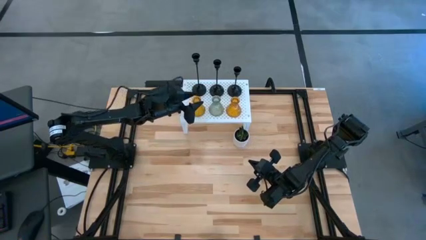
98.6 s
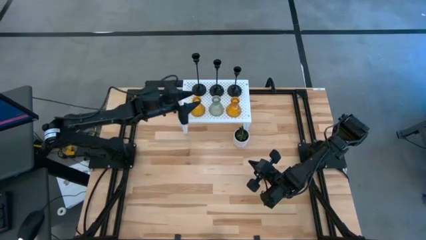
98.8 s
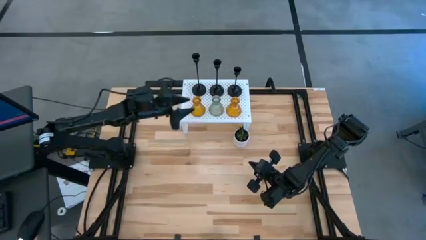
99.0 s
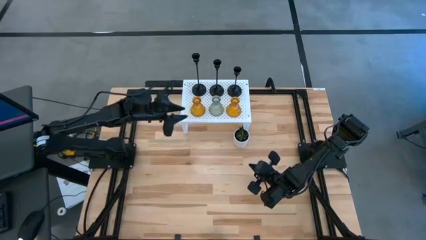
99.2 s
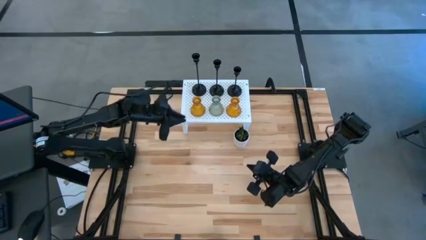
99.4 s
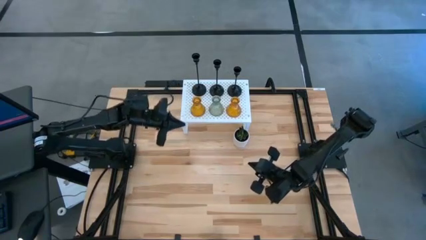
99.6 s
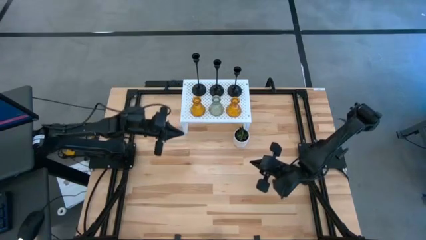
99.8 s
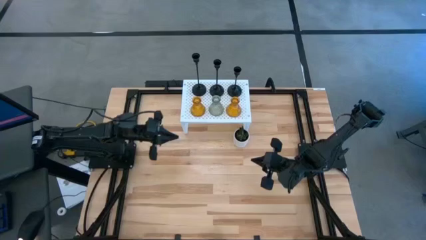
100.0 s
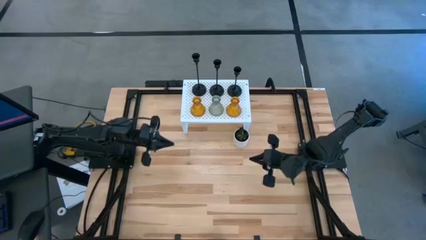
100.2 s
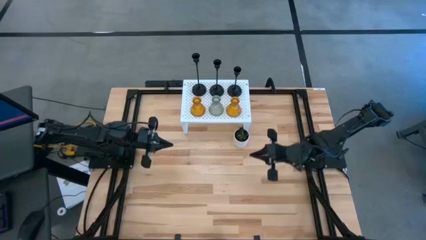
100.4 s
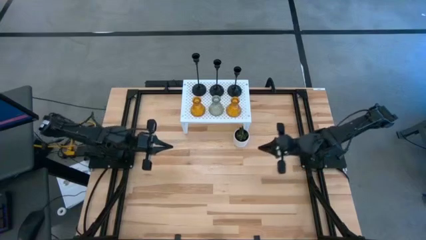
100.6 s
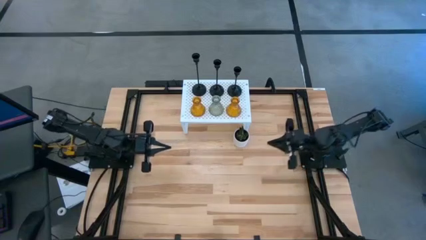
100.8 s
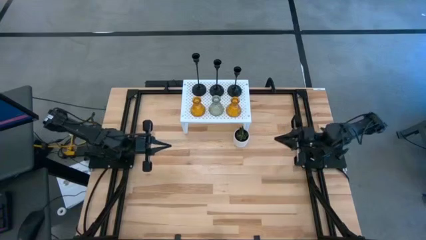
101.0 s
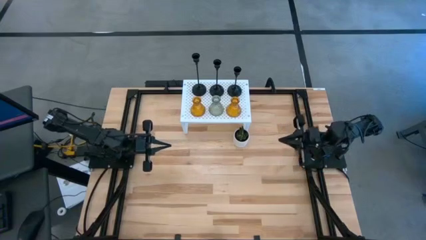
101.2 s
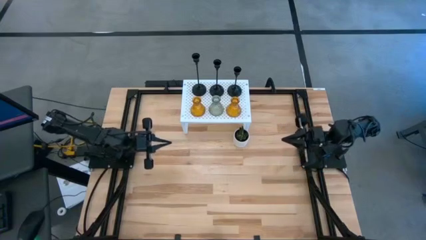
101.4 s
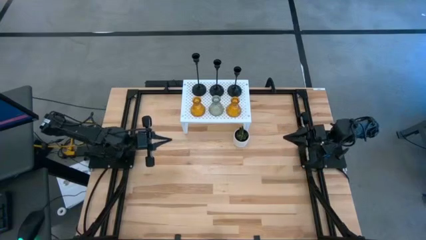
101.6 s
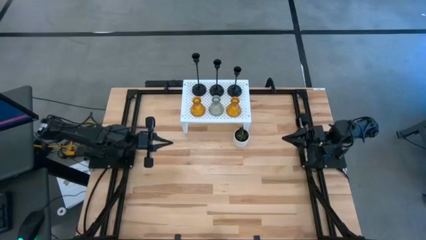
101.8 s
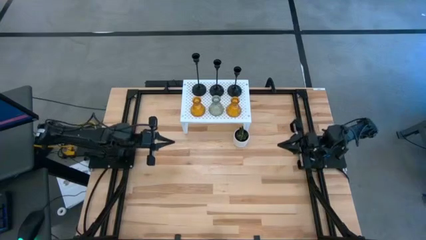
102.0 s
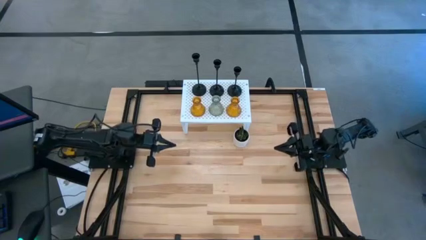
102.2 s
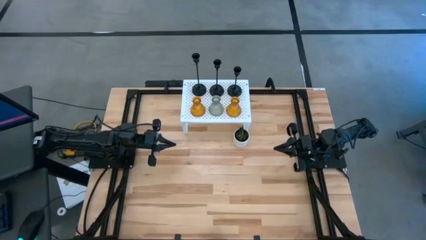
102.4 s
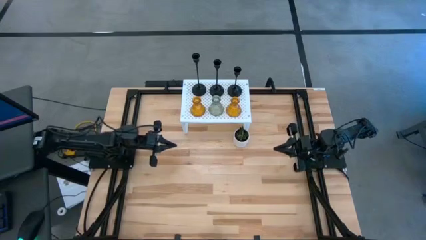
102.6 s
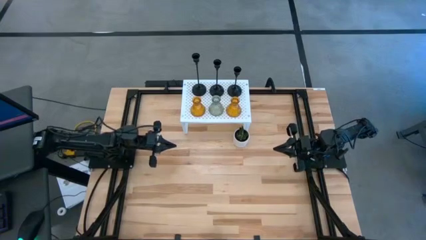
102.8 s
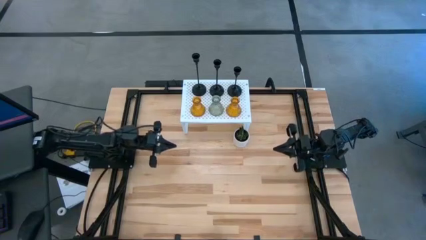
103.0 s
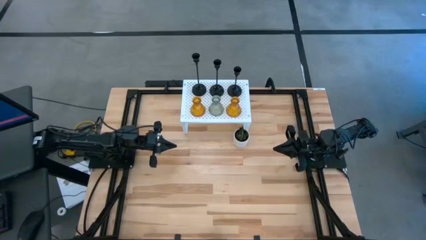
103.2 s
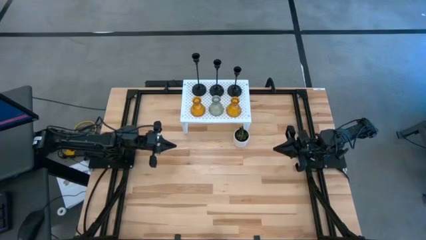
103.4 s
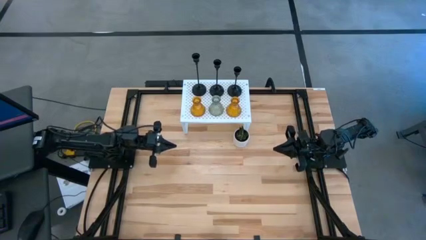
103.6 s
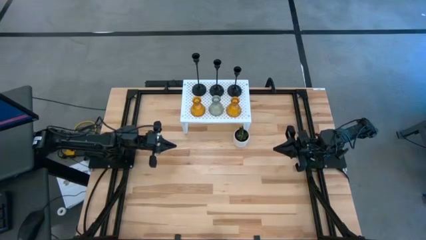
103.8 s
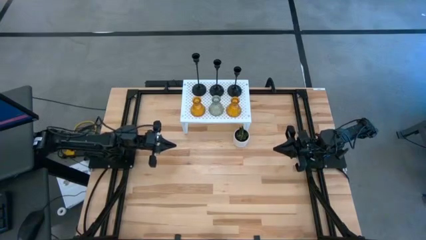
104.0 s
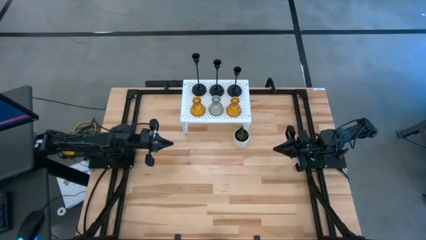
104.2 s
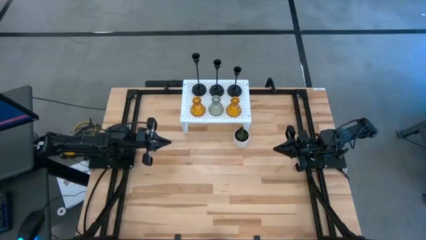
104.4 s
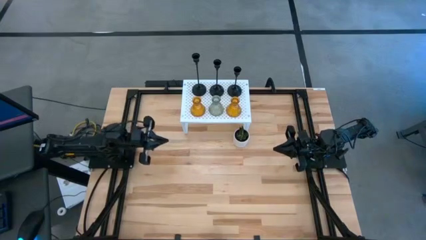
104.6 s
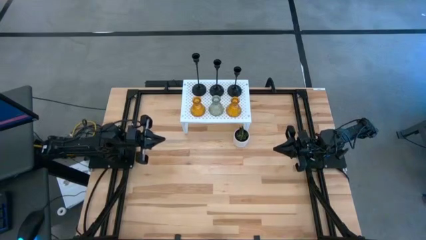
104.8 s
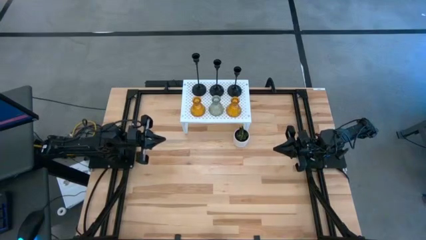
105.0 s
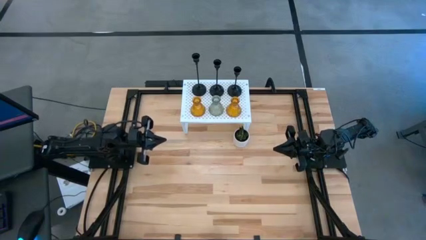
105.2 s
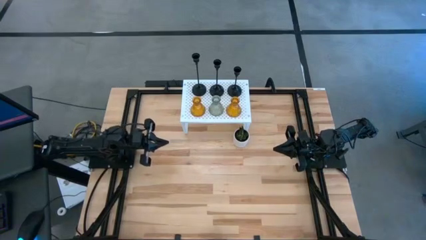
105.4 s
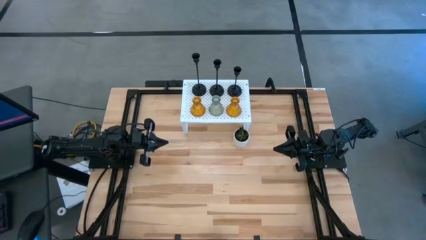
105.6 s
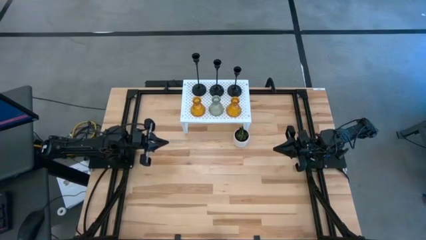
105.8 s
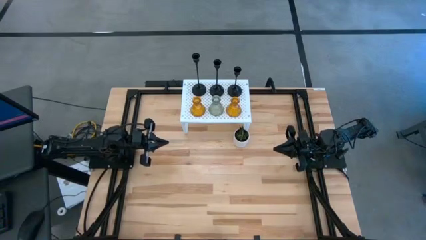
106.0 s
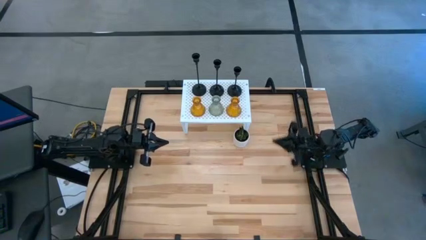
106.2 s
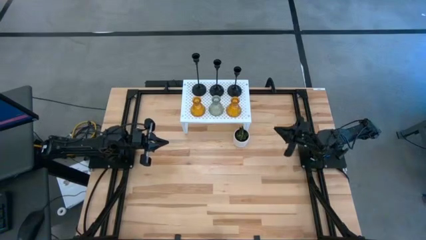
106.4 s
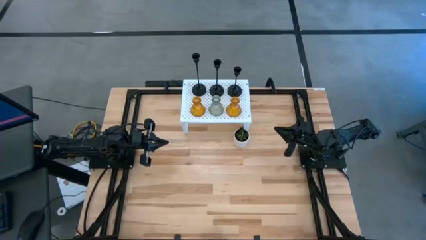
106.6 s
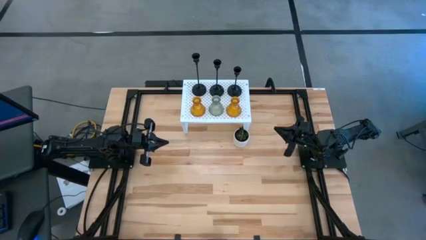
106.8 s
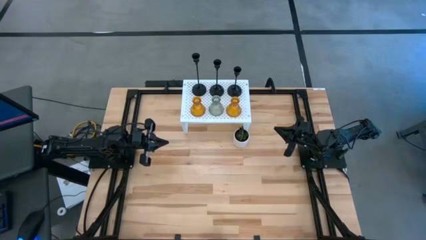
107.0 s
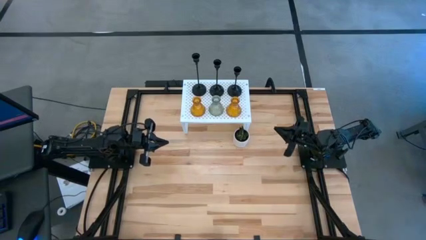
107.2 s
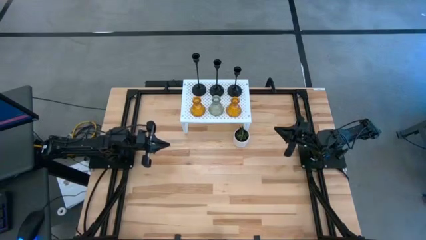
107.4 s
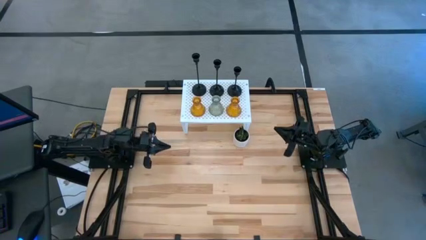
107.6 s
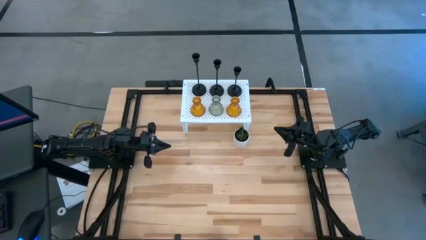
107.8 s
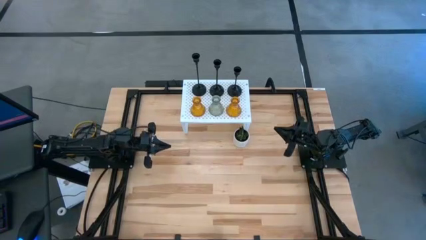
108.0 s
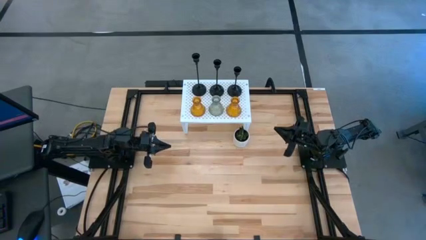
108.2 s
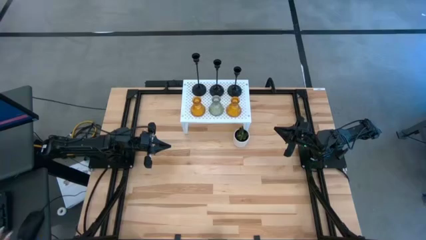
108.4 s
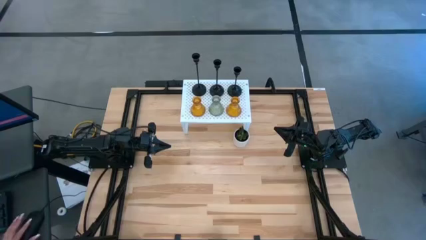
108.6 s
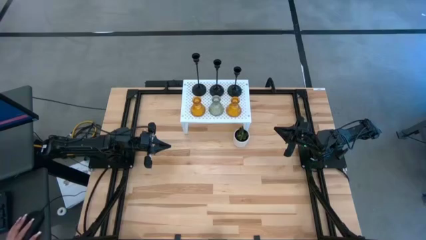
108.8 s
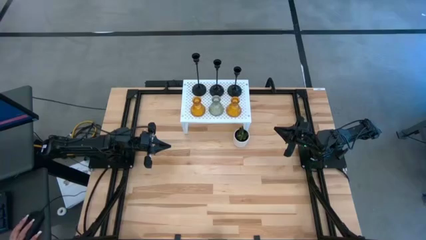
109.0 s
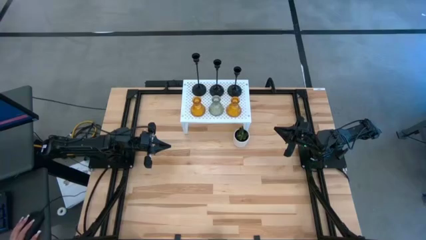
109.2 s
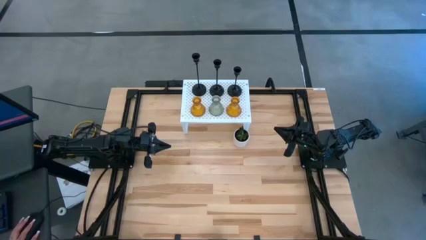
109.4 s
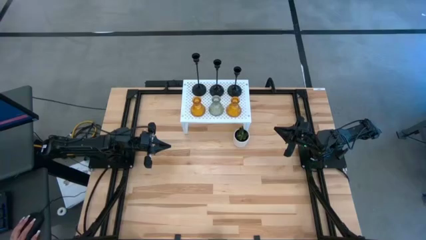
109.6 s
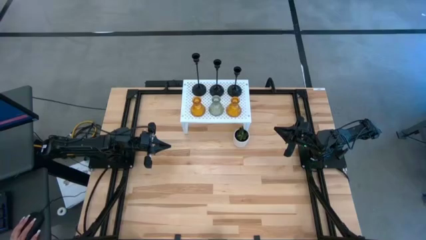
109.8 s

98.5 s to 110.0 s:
Task: Pick & Place candle stick holders
Return to Home Position

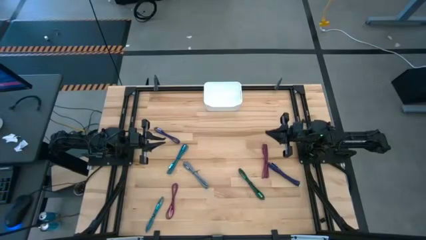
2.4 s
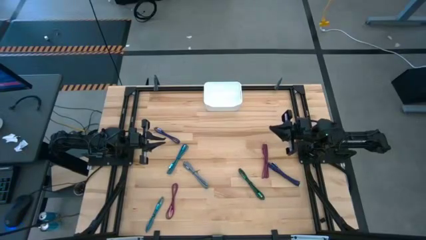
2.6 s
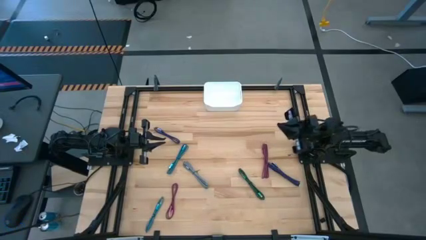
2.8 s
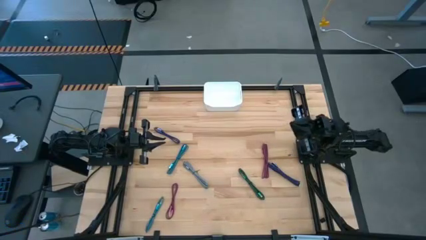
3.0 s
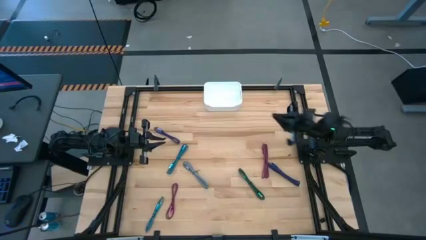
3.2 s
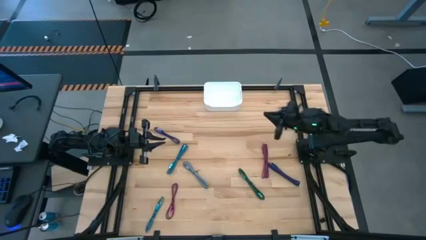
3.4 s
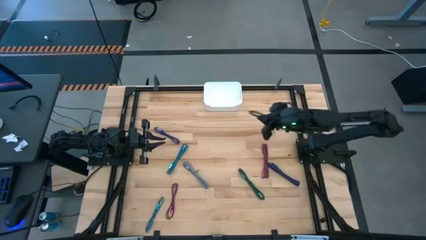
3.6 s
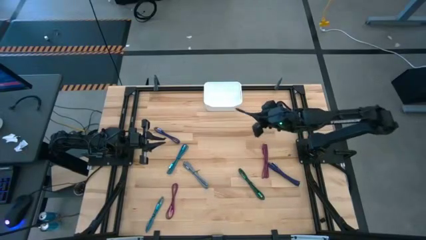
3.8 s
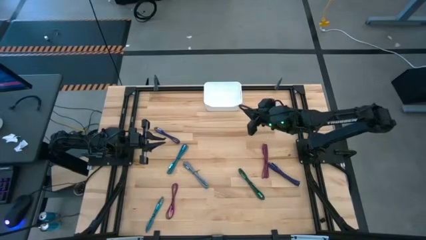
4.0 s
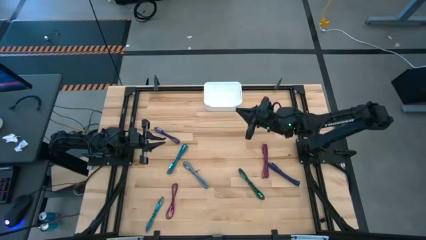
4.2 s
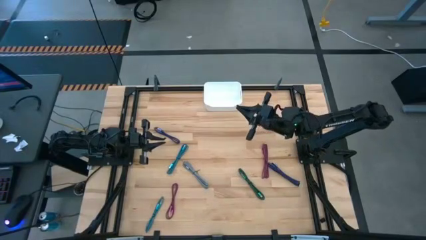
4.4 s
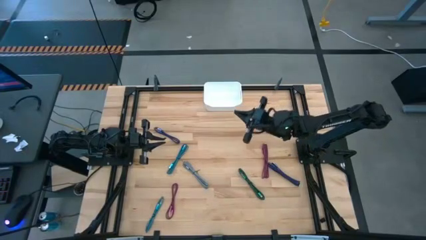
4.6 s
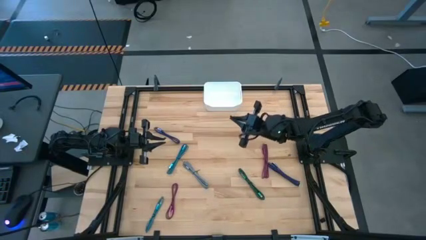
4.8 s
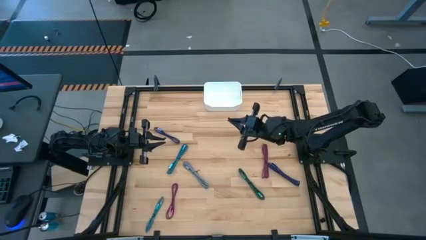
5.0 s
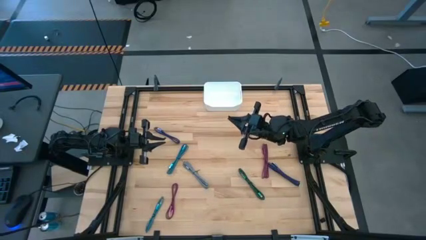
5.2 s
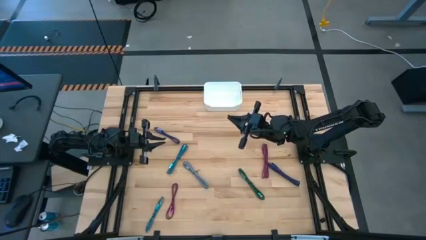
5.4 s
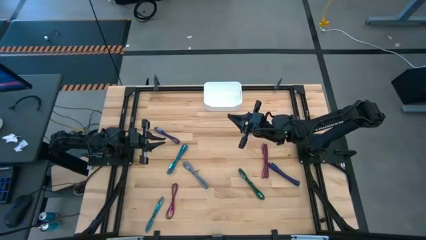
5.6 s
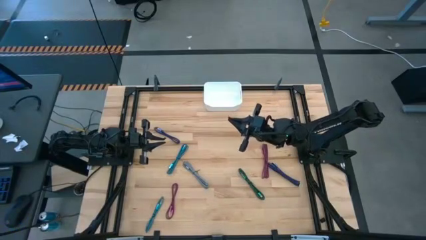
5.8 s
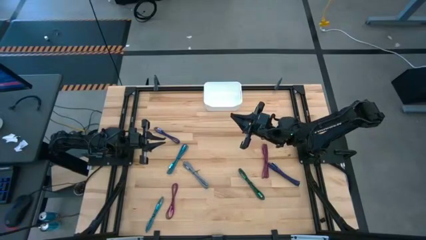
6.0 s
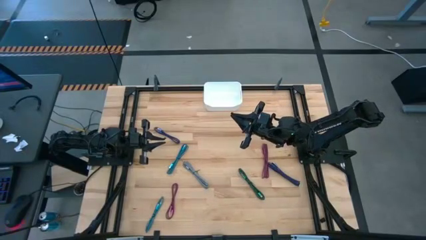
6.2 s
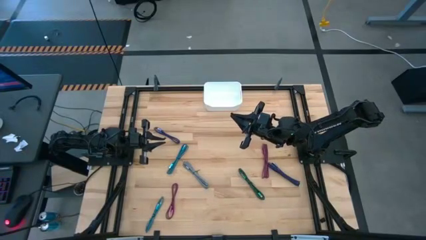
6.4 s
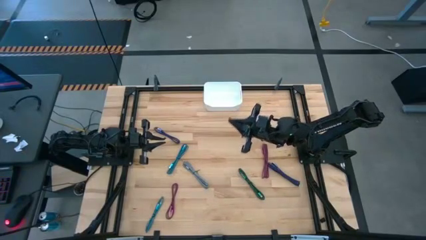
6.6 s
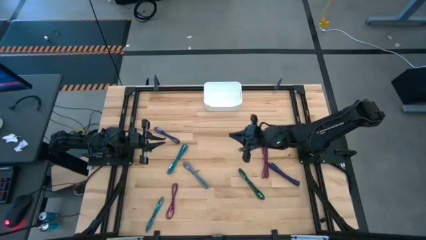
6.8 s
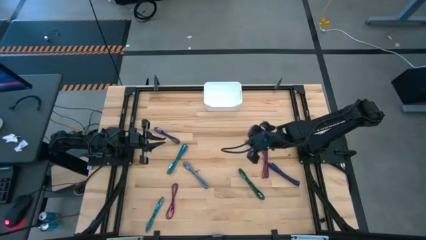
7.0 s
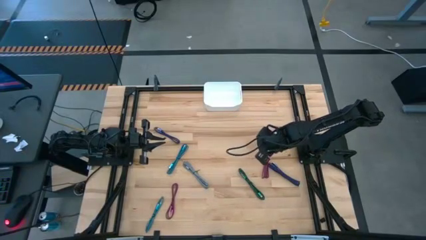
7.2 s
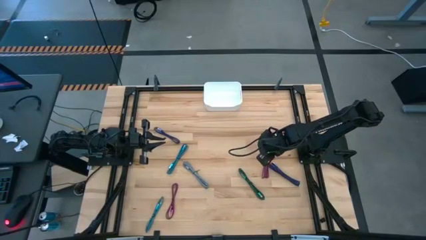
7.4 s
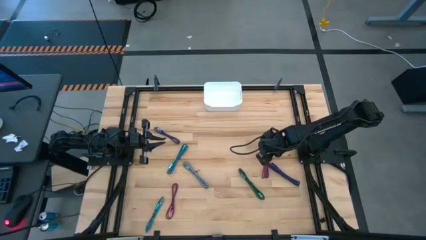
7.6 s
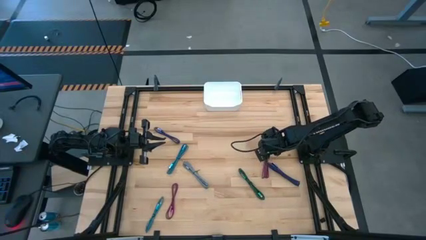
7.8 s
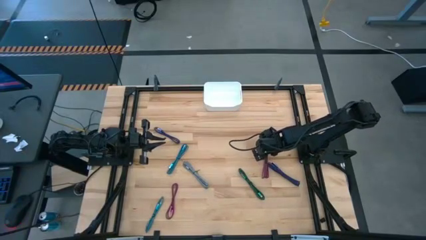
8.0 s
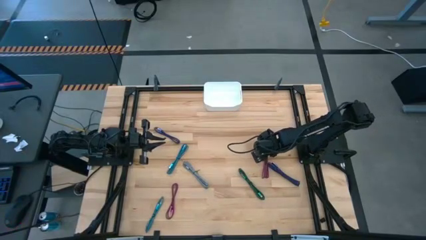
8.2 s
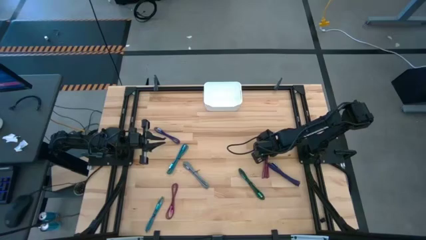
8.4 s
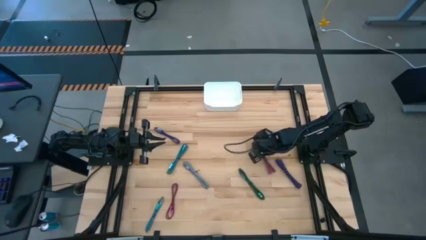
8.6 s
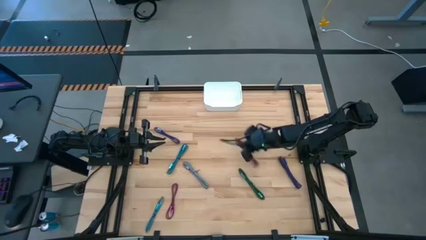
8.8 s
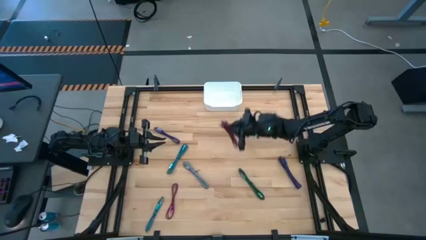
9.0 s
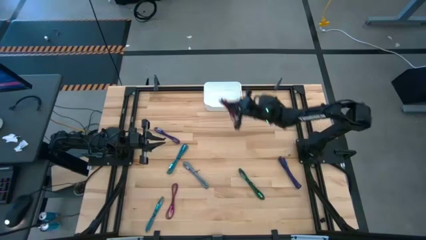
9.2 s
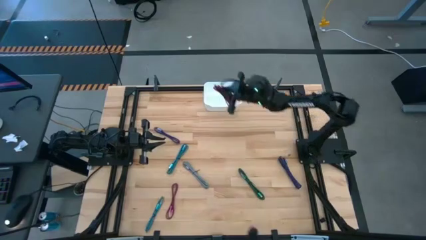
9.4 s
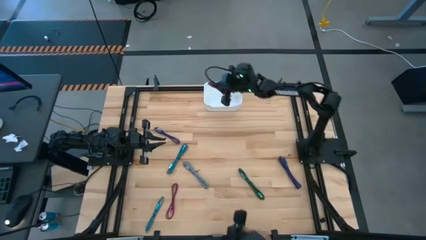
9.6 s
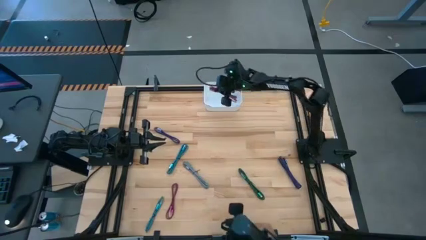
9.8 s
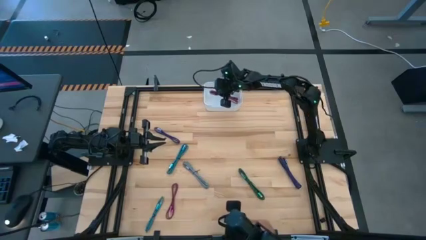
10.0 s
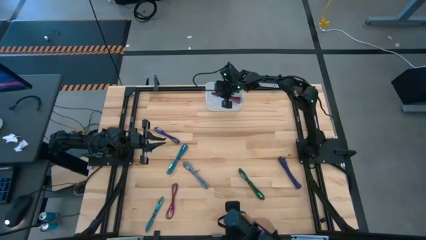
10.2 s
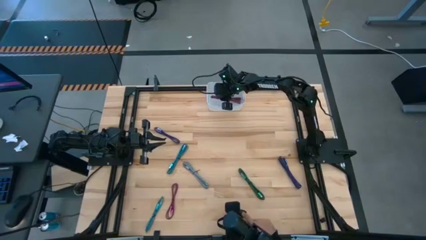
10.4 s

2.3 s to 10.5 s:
Task: Pick and place USB-C Cables
Put the right pink charger cable into the white bin
